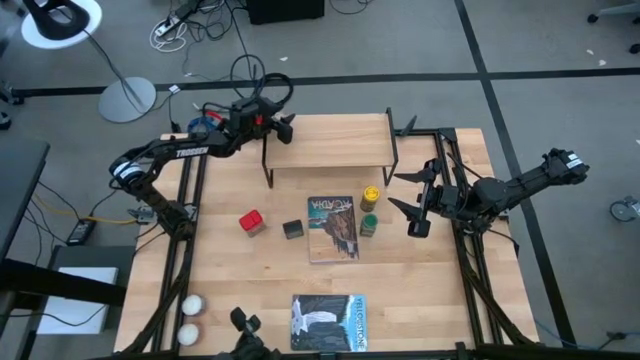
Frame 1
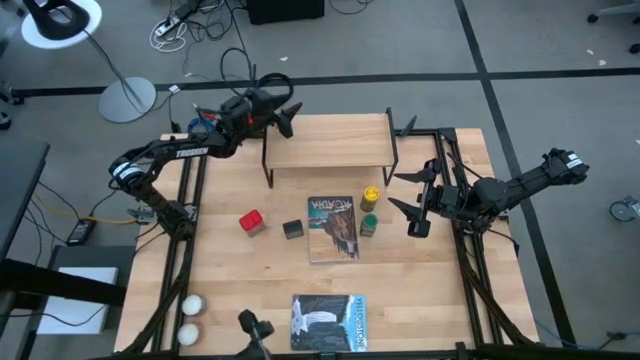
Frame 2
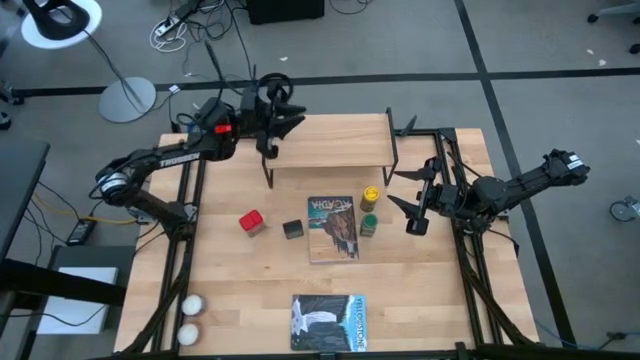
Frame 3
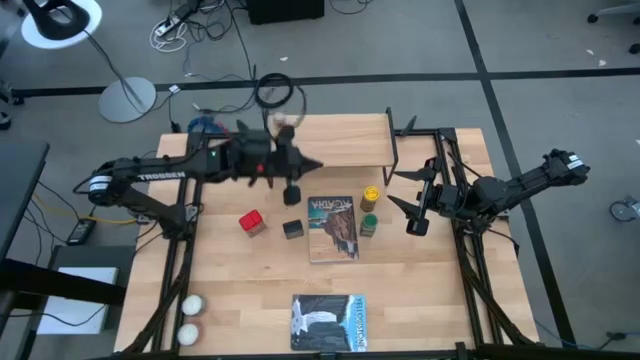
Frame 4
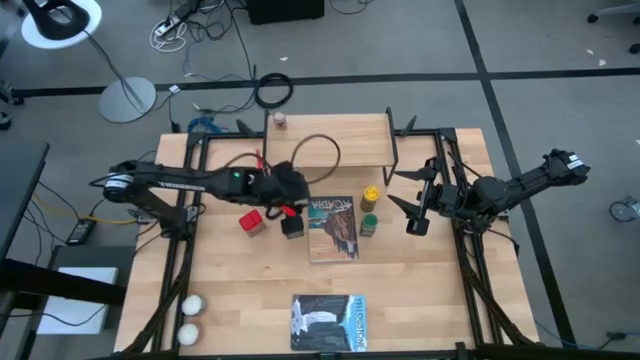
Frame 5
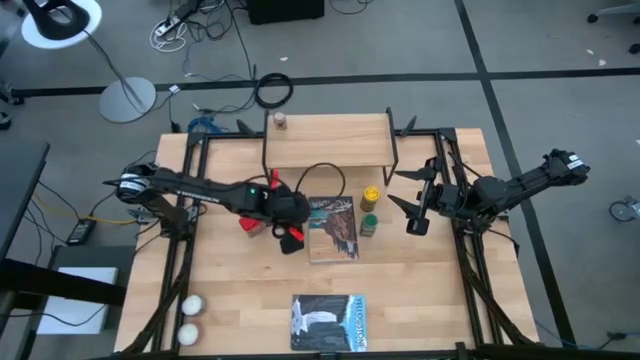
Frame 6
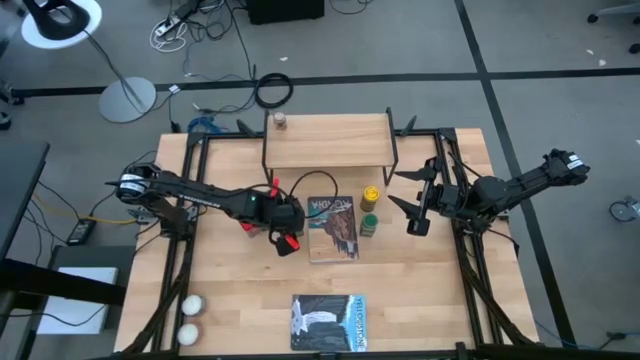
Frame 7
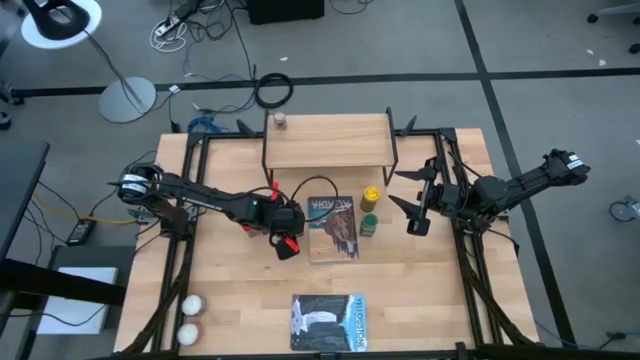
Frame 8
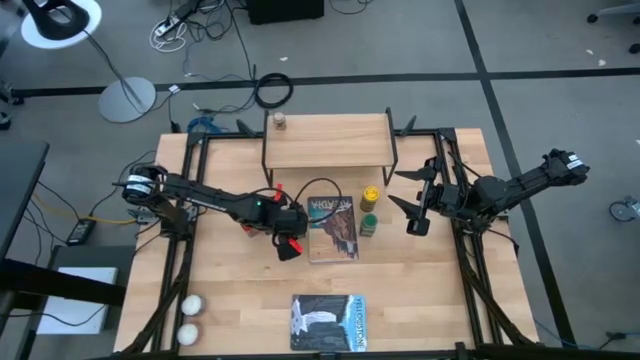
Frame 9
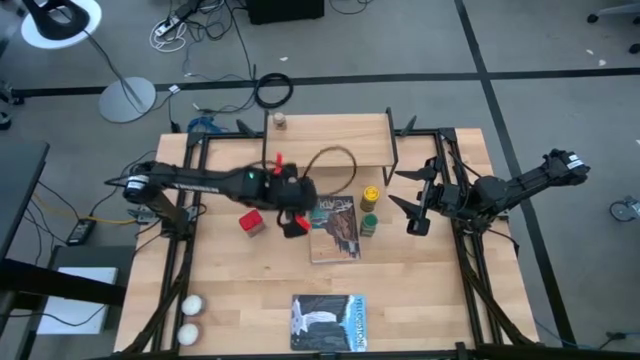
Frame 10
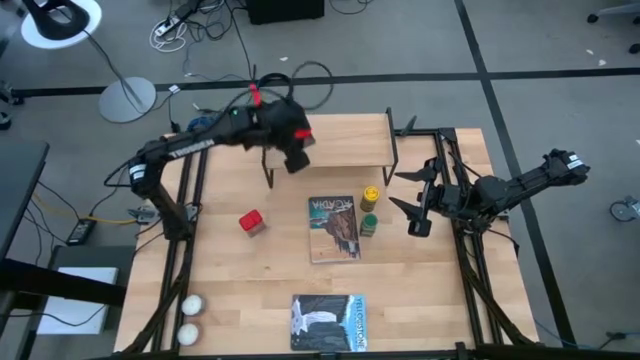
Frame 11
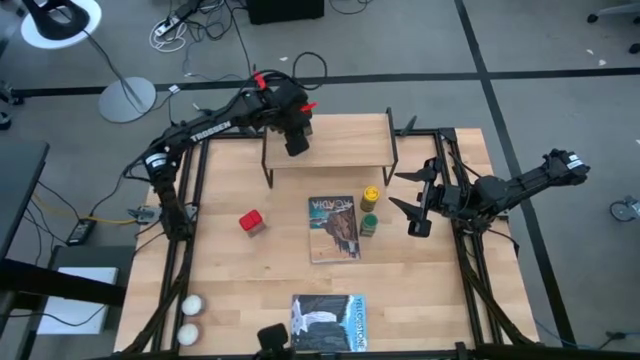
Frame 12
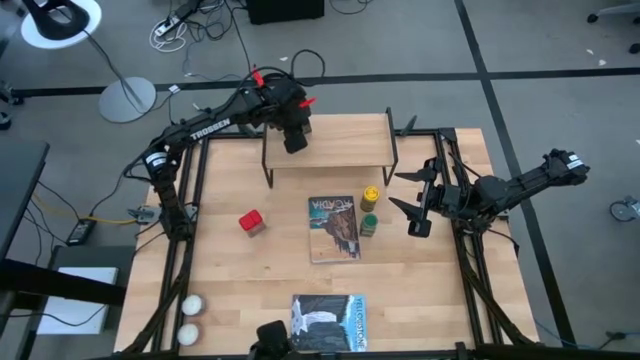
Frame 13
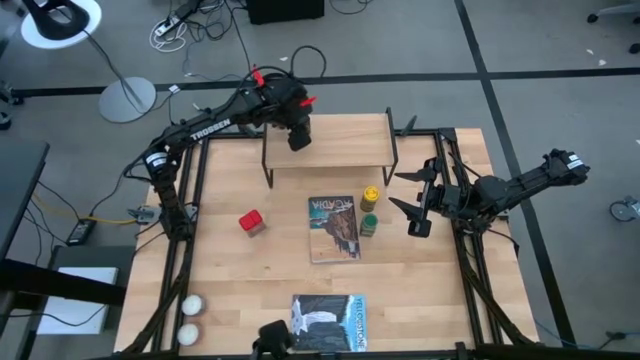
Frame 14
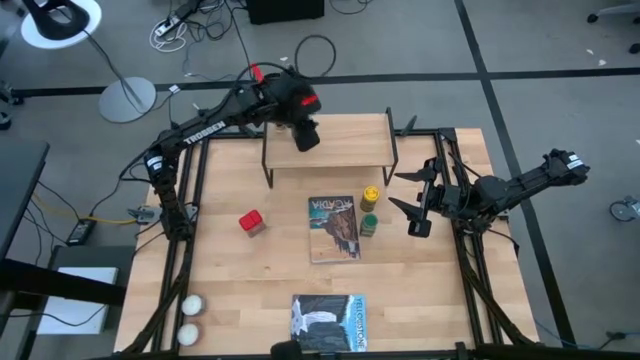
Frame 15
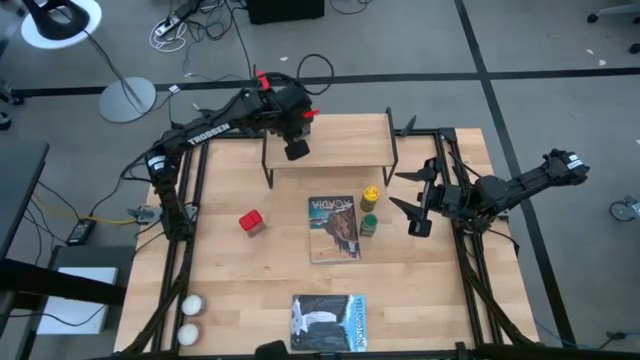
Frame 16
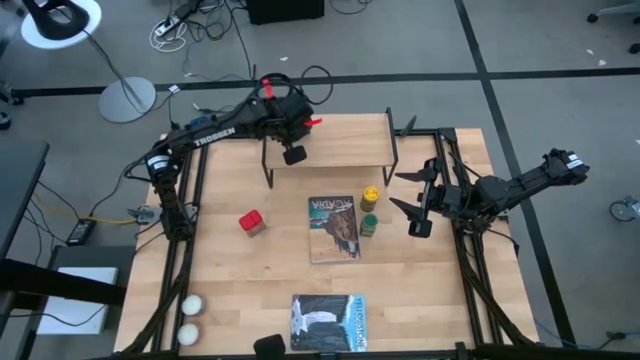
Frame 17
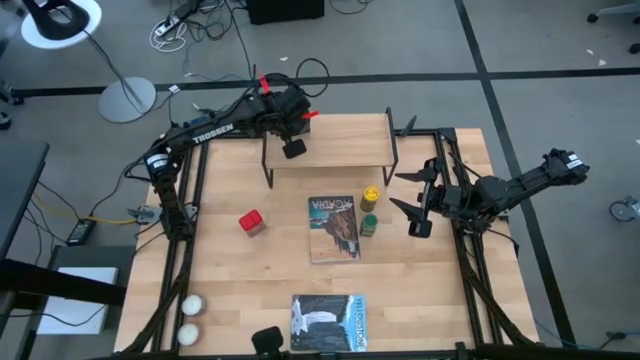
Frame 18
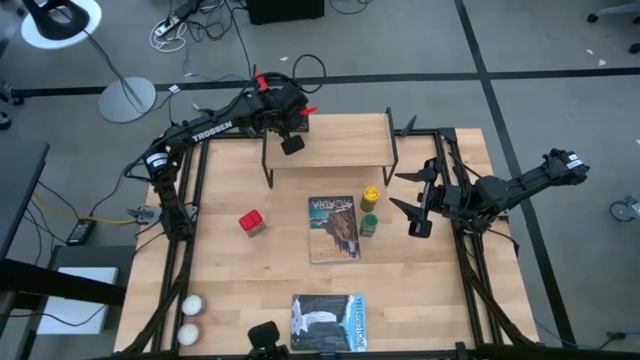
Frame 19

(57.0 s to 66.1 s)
Task: Shelf spices
Put the black seasoning can on the shelf

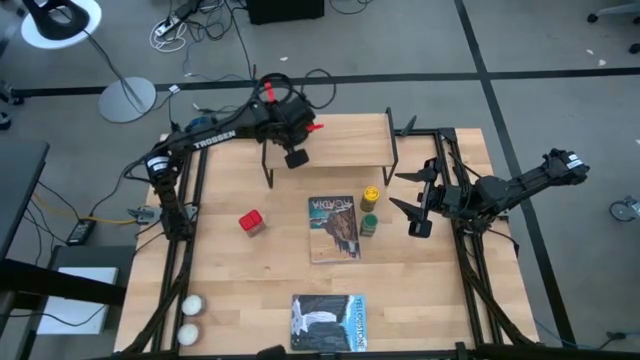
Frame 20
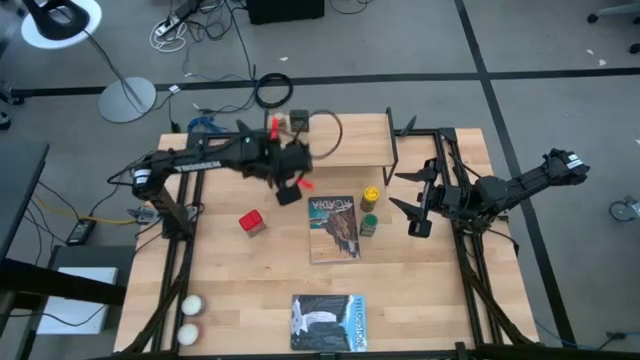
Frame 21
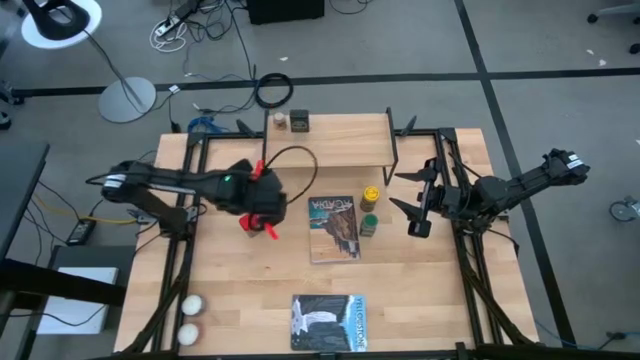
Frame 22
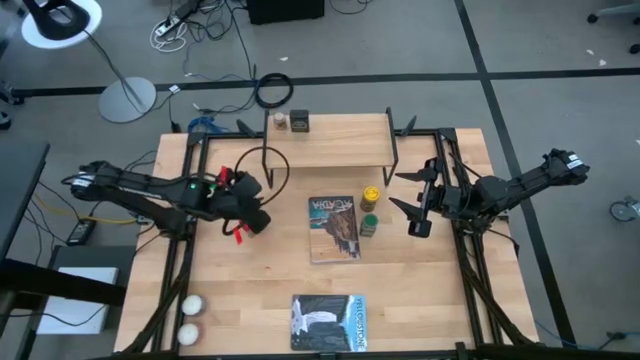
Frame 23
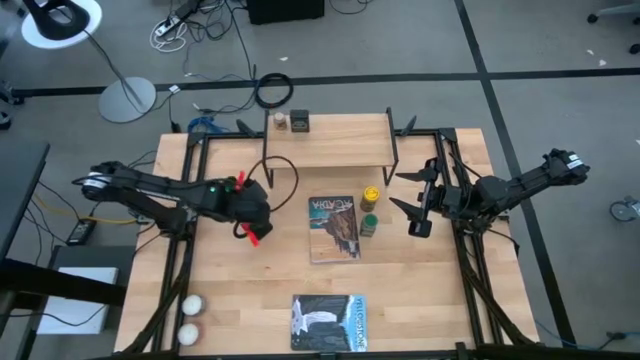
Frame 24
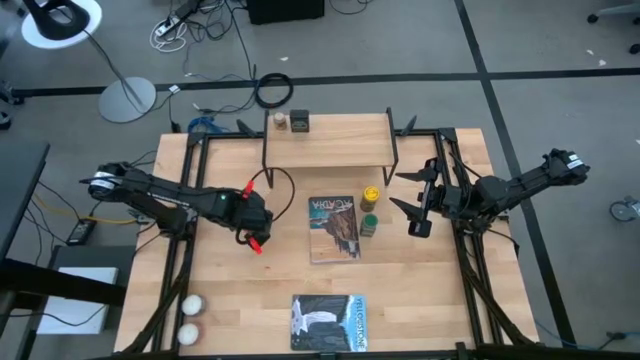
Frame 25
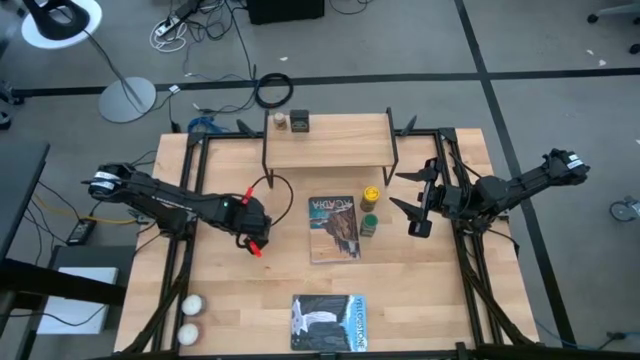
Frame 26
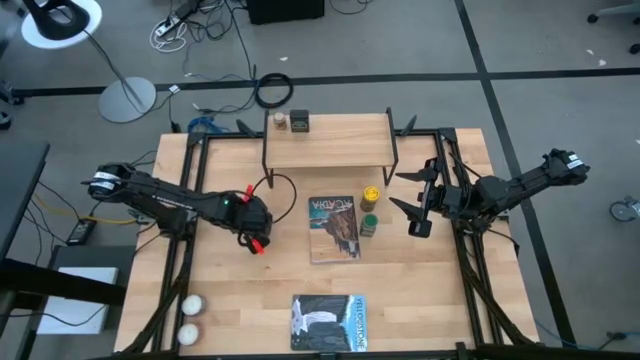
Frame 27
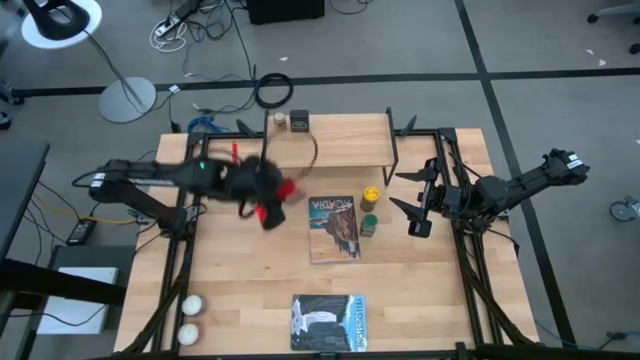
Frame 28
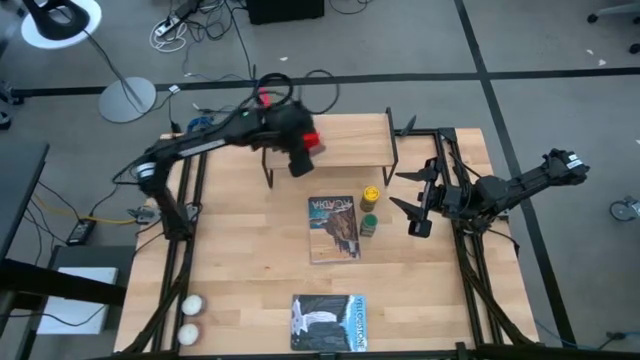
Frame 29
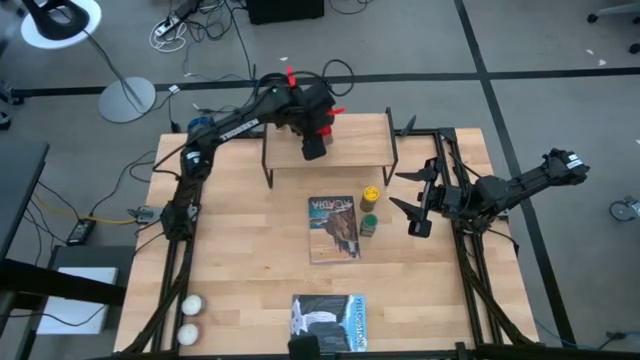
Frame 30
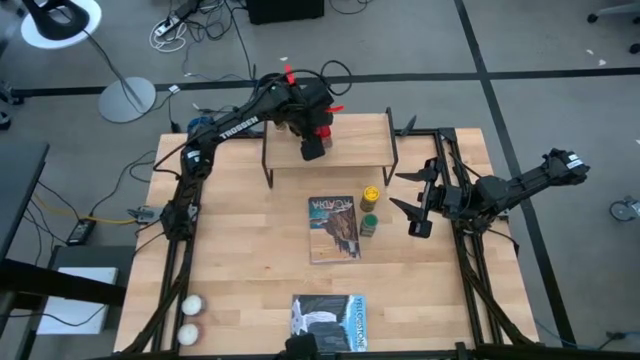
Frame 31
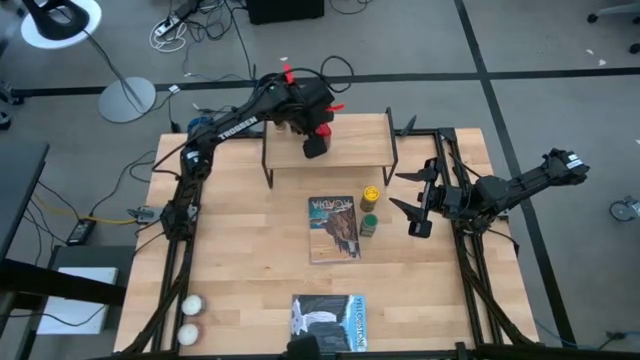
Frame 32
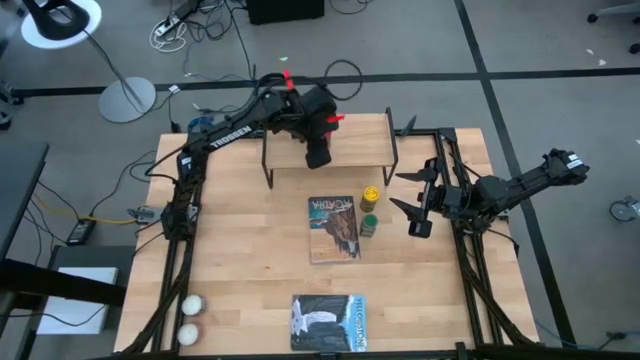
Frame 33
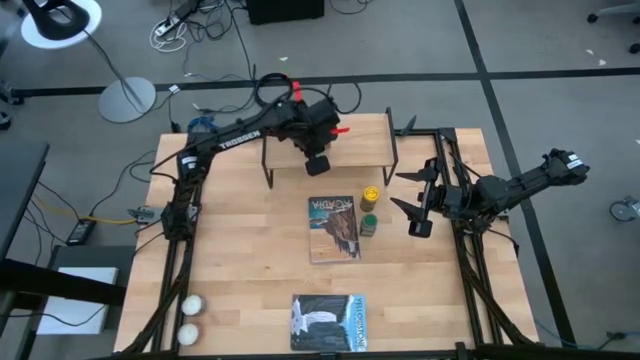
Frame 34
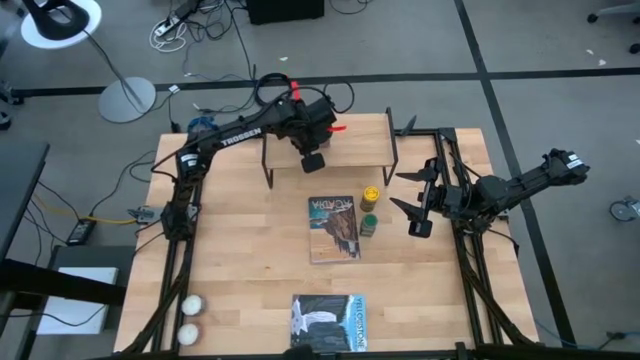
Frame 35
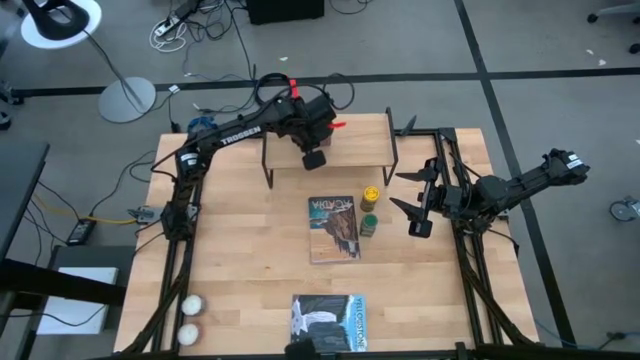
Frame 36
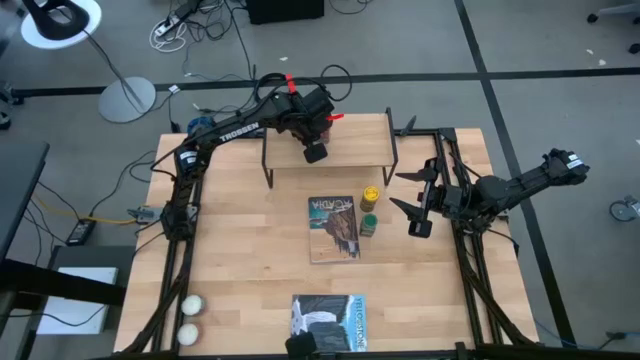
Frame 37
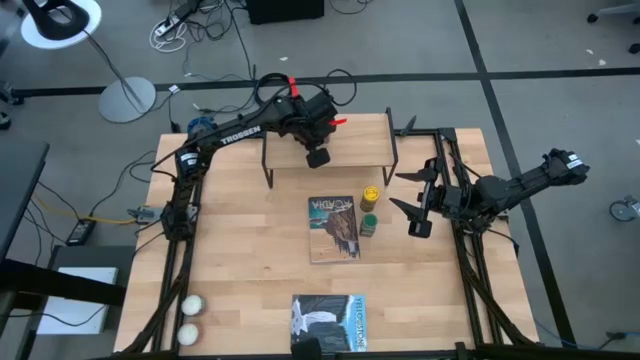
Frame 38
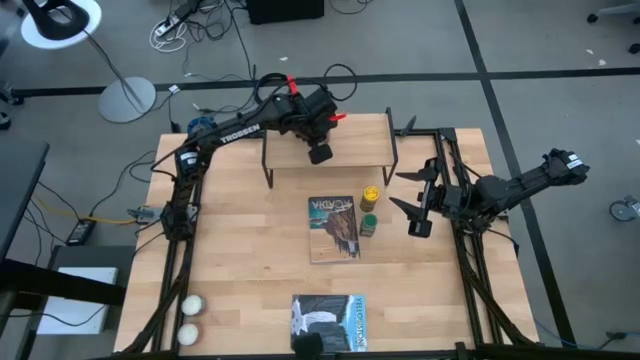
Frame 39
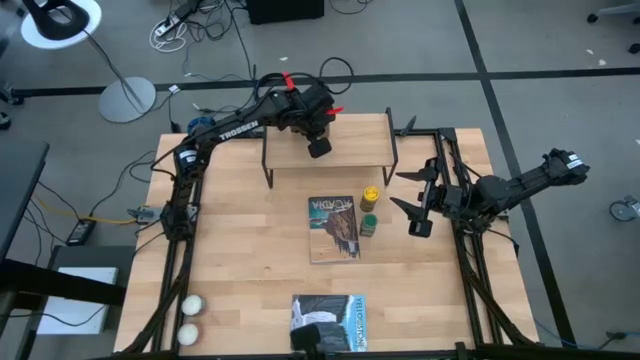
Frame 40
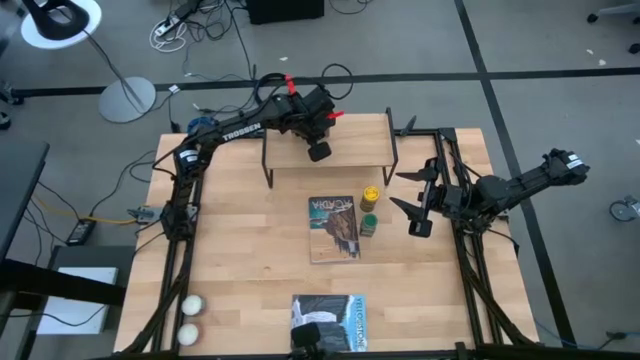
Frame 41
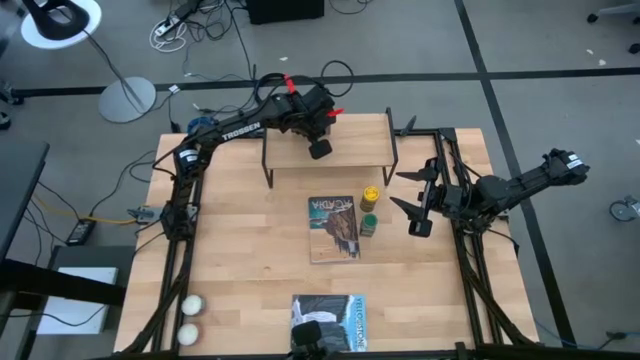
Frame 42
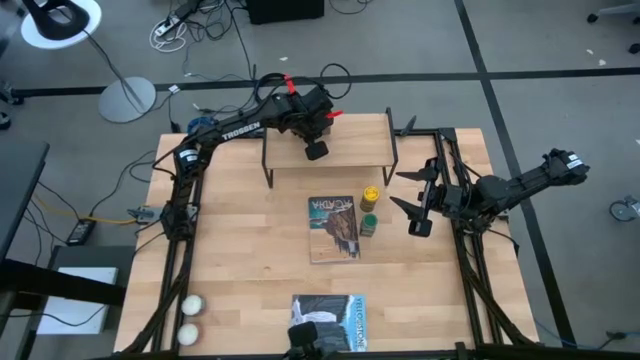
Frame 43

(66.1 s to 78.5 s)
Put the red seasoning can on the shelf
